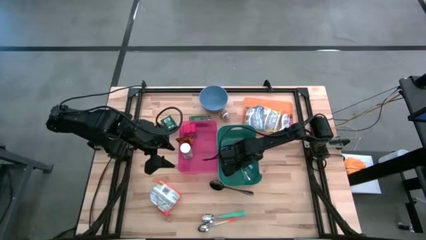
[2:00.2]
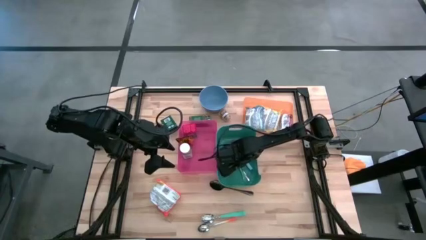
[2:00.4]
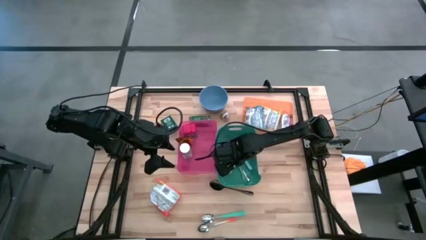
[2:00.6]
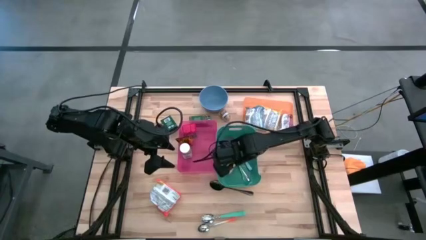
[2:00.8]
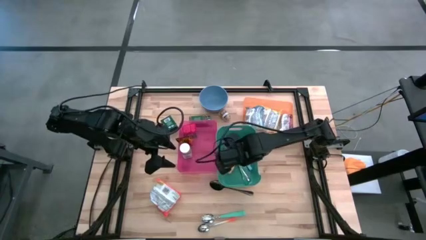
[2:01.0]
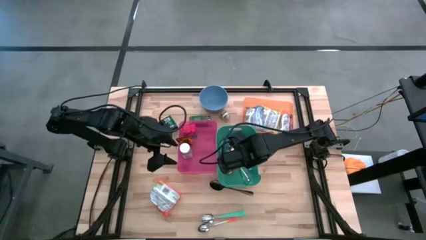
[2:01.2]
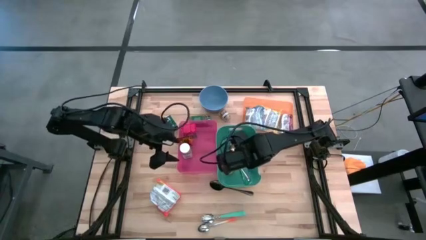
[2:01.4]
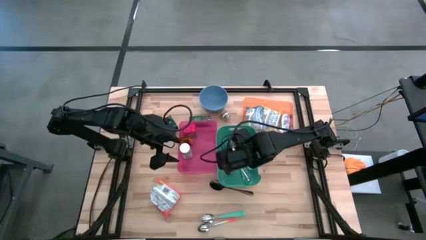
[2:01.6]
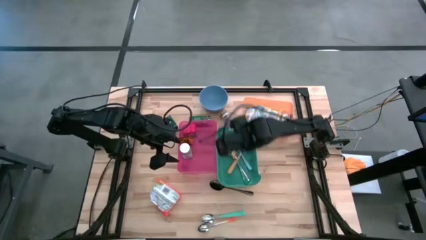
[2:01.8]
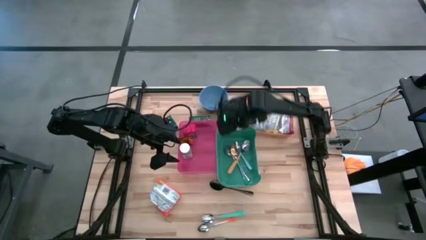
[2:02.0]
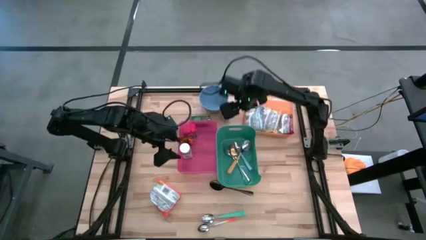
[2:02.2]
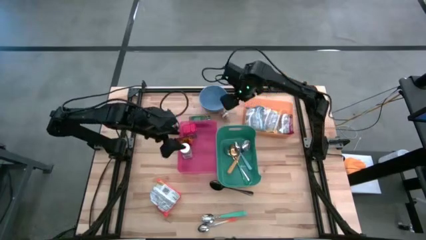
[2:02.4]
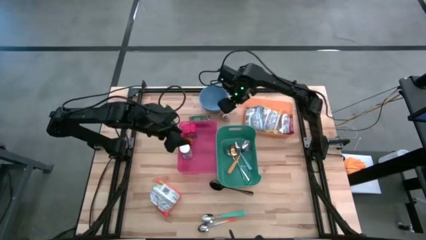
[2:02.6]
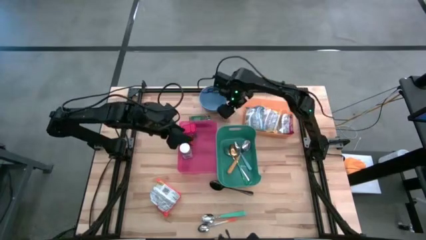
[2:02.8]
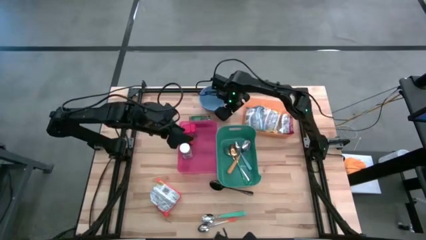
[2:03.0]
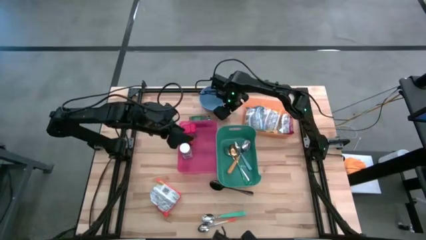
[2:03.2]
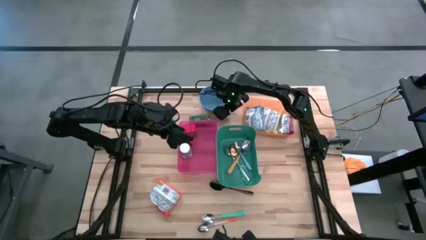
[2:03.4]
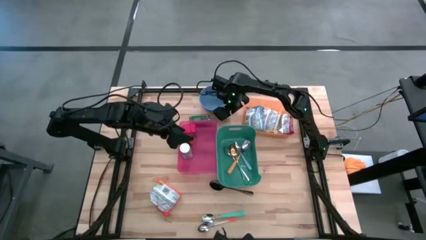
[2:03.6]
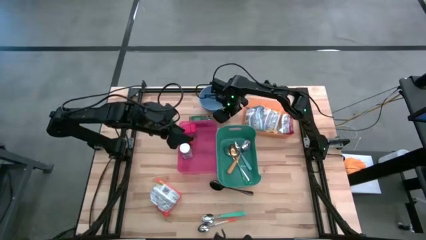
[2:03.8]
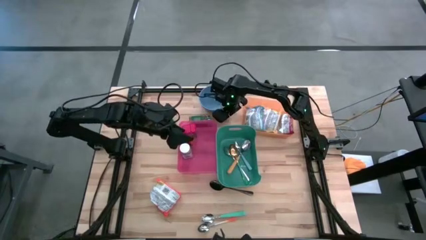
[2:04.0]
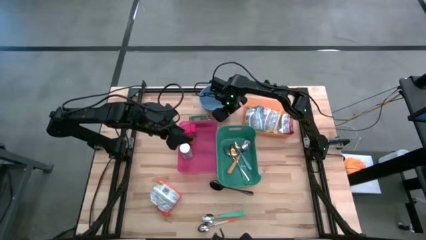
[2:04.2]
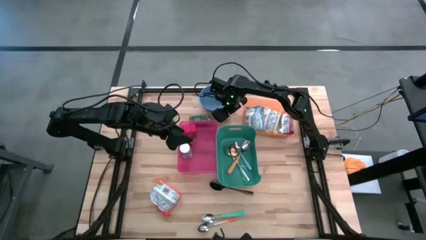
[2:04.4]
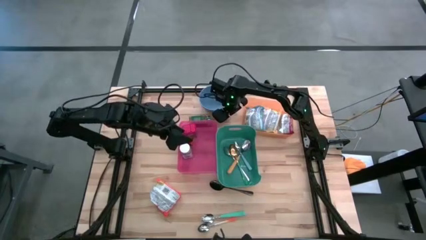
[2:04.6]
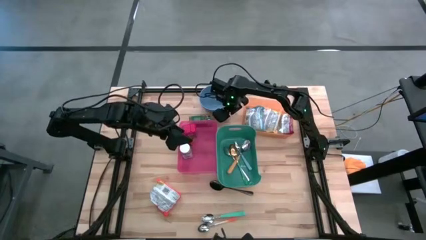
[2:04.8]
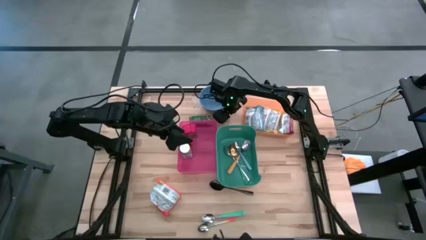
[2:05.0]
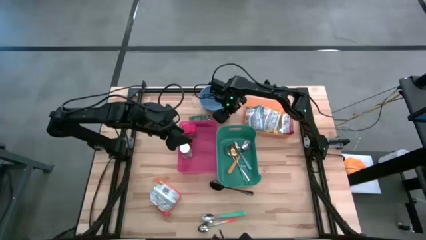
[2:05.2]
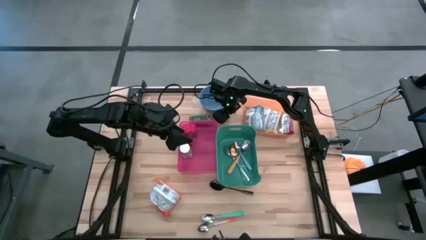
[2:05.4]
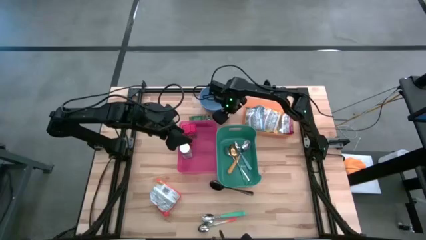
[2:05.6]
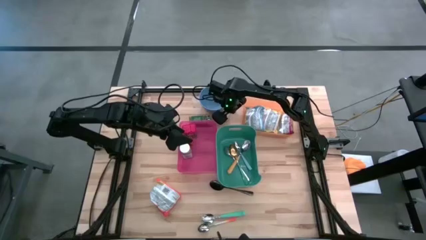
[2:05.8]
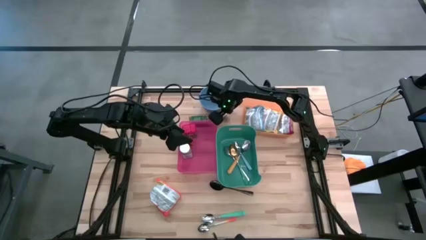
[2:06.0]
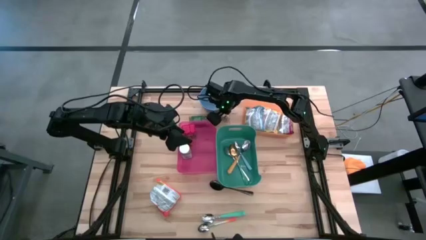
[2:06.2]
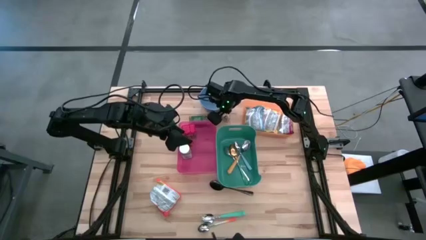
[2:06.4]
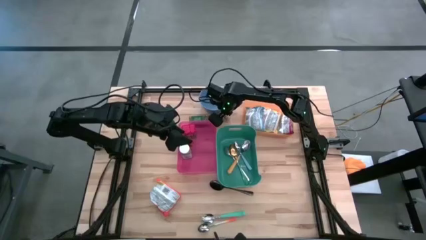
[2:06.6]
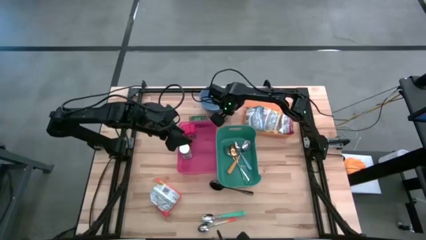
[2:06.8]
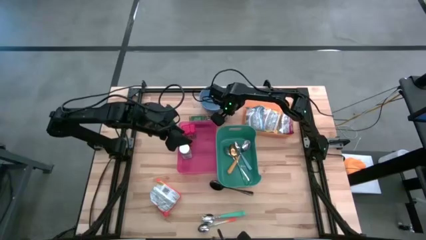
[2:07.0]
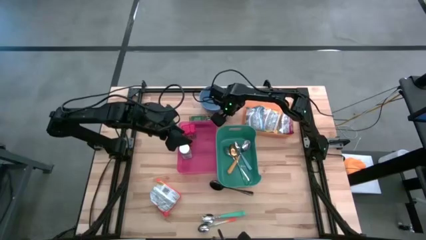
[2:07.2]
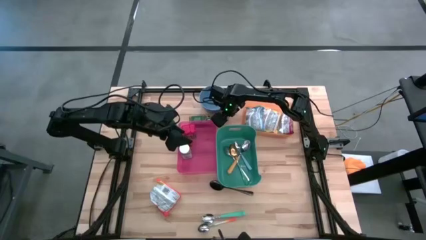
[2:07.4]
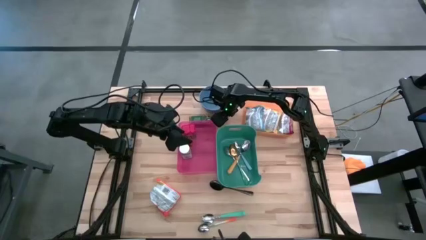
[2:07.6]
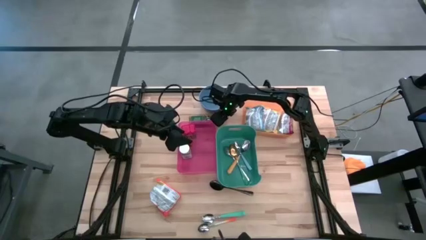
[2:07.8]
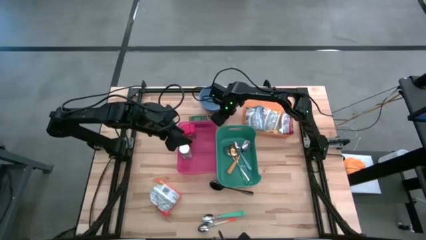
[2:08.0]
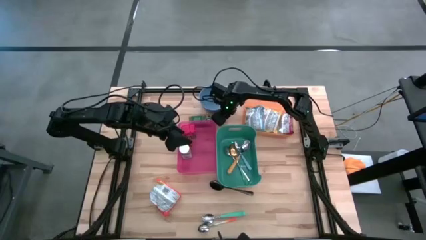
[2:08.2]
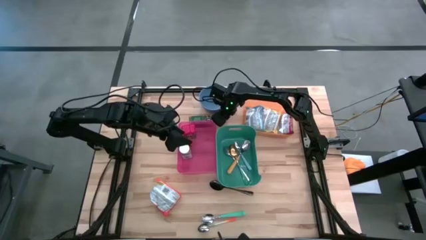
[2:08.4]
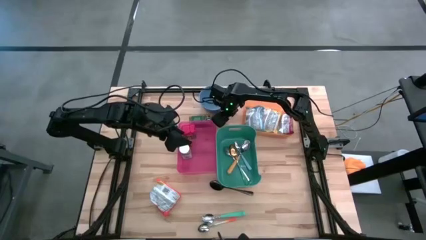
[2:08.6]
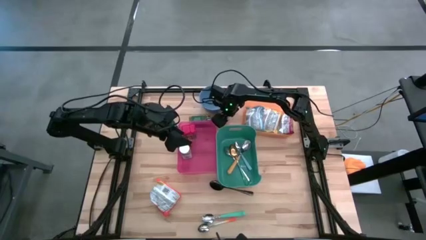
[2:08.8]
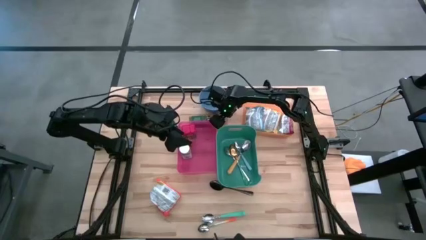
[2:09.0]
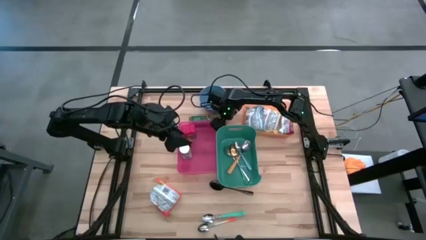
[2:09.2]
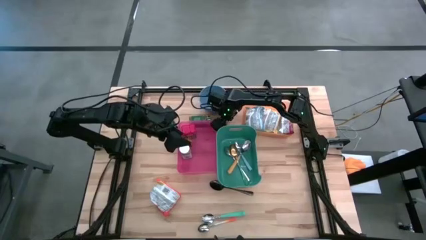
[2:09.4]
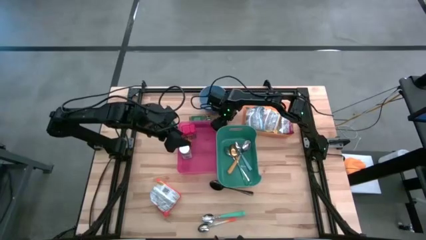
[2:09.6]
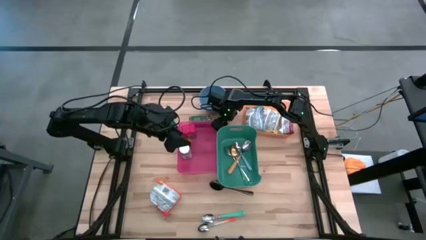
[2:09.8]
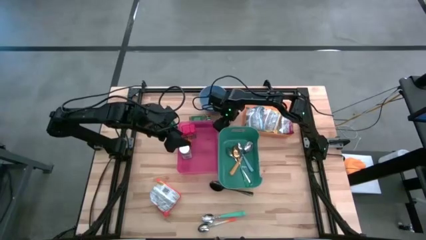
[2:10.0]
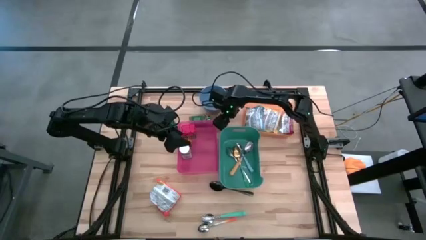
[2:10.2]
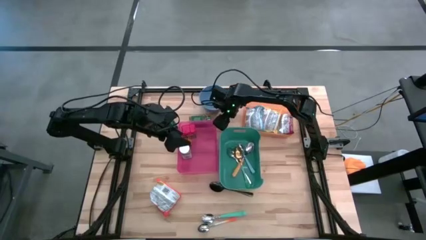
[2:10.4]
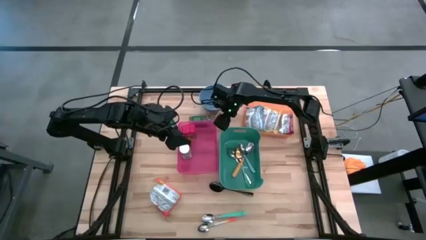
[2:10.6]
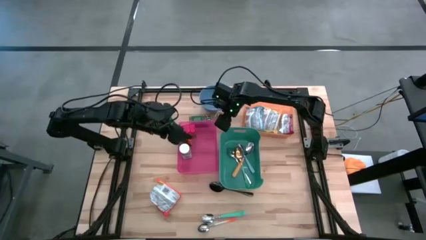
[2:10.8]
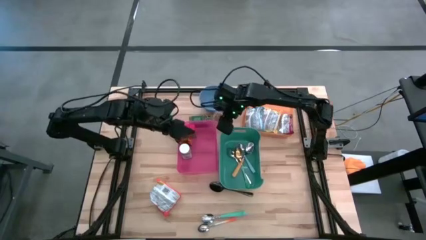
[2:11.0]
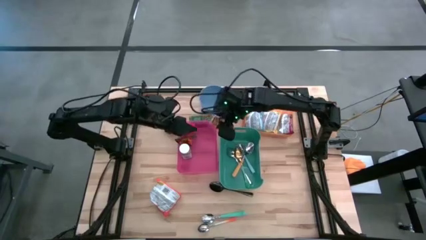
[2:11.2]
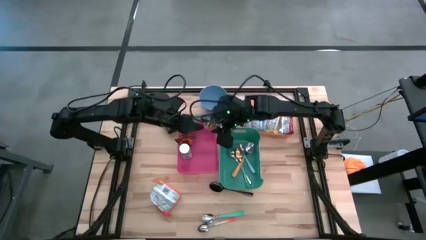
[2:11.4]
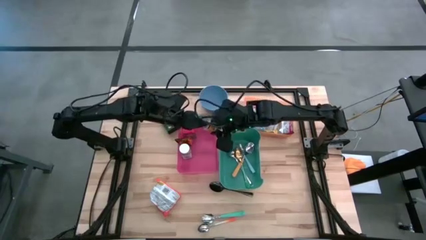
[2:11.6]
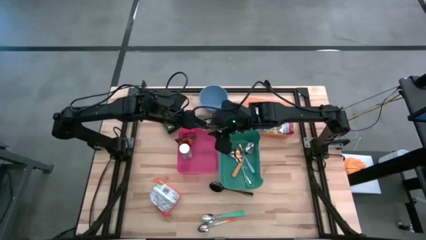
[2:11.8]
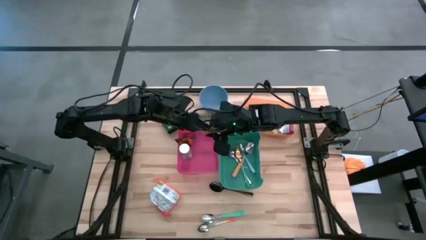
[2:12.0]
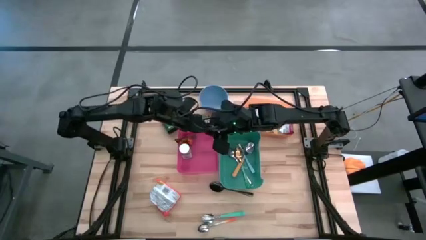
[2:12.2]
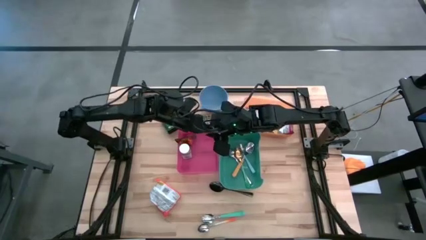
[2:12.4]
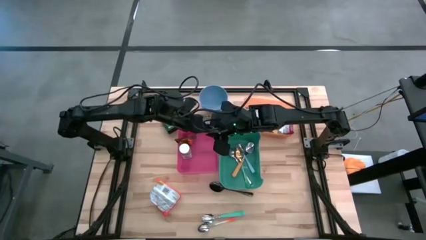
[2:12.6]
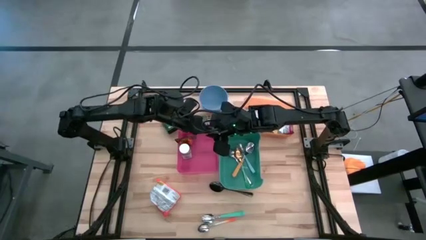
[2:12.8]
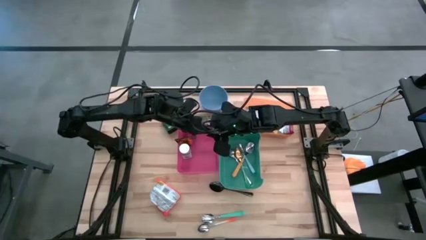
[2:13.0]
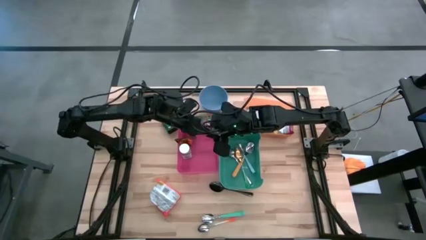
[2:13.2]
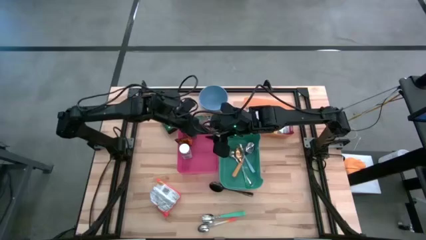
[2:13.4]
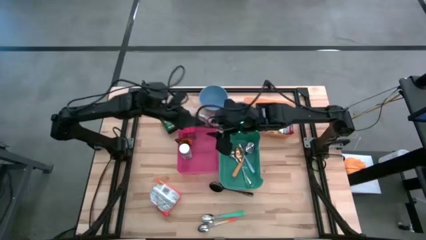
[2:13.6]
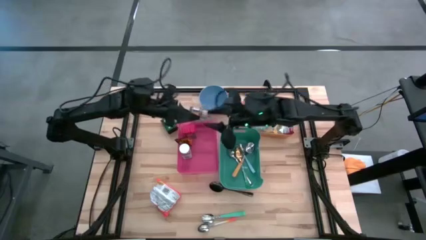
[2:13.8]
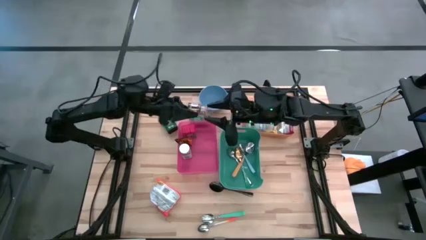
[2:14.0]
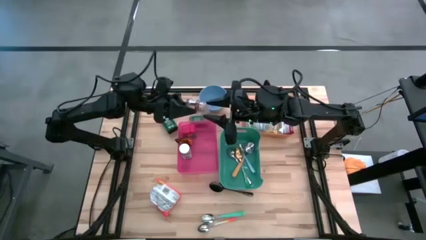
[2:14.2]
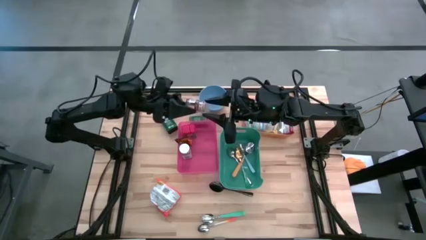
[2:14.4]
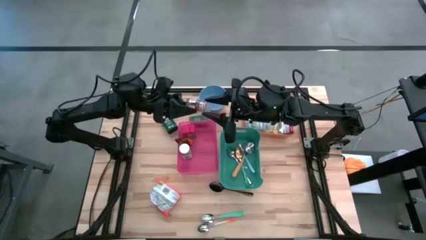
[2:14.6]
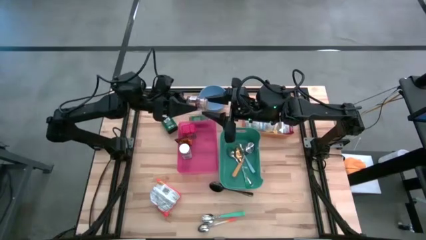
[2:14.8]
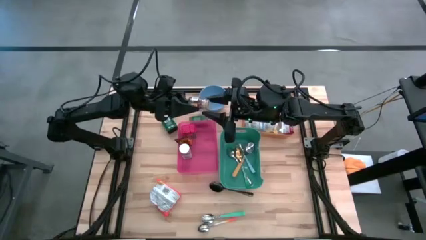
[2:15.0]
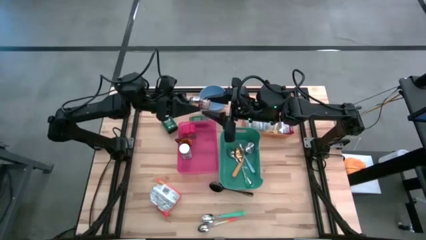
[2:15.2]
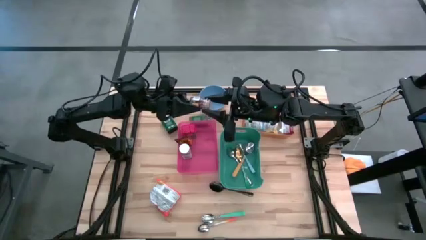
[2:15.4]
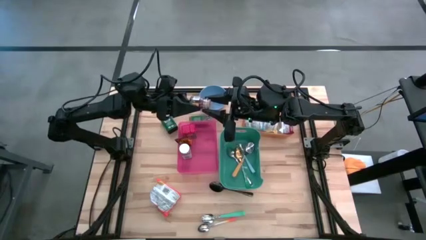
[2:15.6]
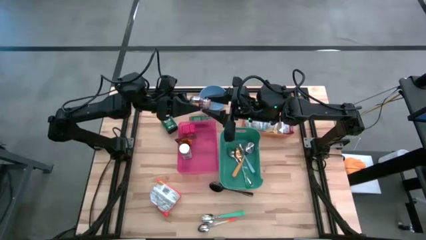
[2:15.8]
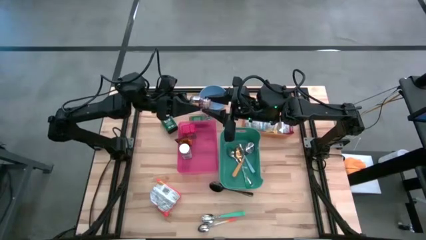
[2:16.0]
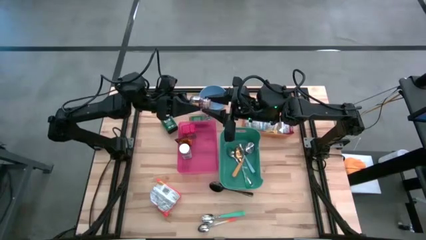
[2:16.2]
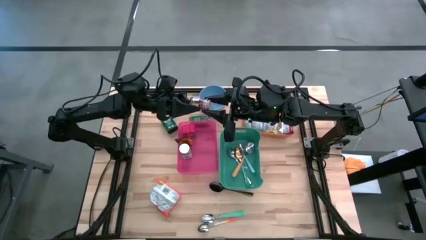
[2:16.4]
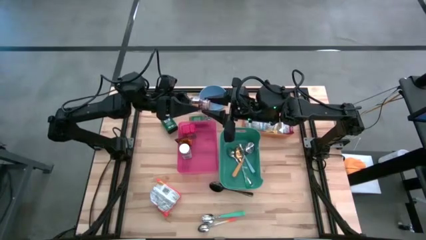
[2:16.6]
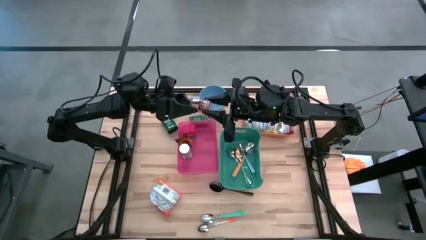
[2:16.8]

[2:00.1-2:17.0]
Put the brown spice bottle into the red bin

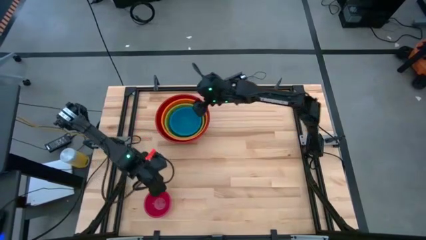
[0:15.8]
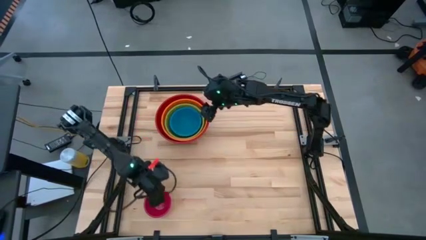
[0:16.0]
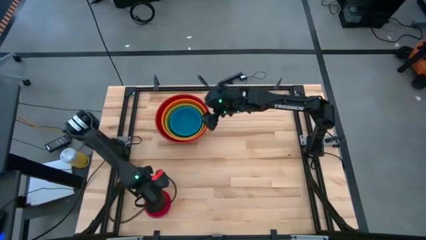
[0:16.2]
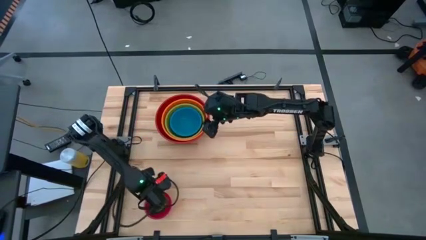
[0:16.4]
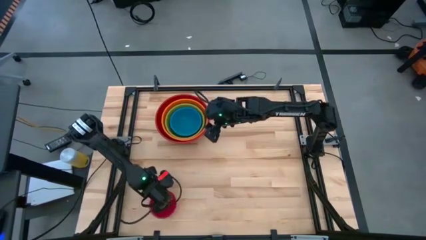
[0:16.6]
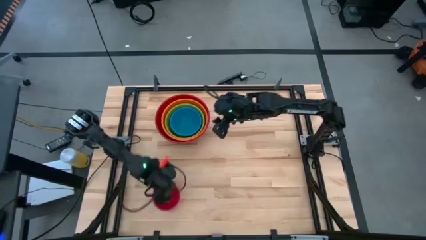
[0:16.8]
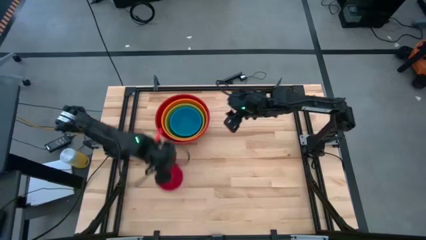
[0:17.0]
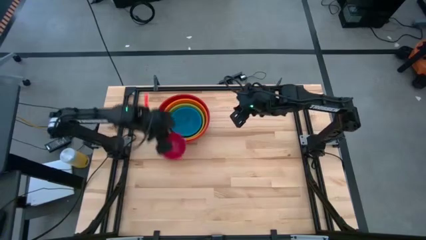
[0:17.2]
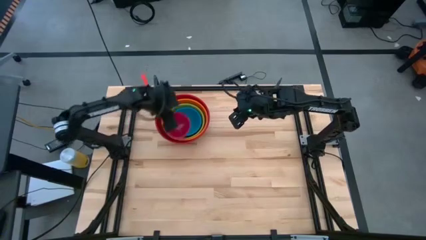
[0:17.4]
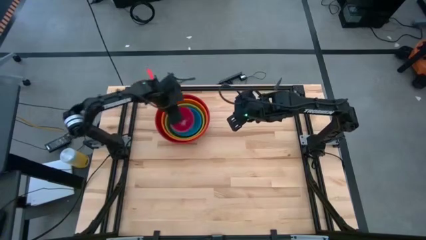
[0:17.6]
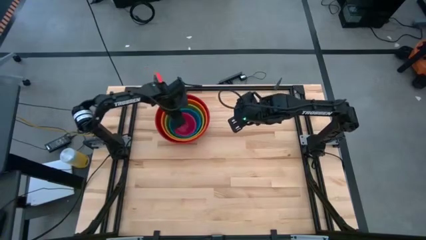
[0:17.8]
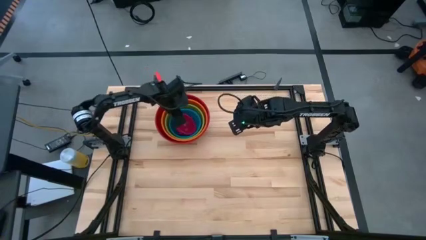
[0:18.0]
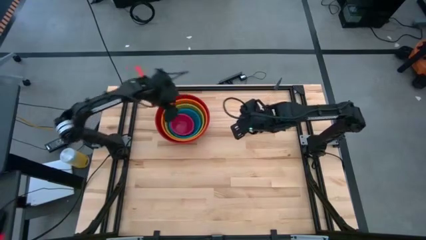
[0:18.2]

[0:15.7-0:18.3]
Stack the pink bowl on top of the blue bowl
